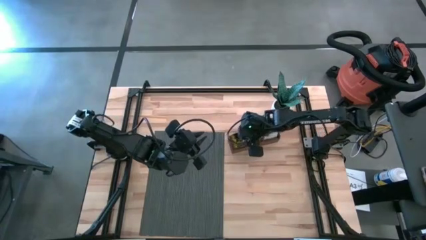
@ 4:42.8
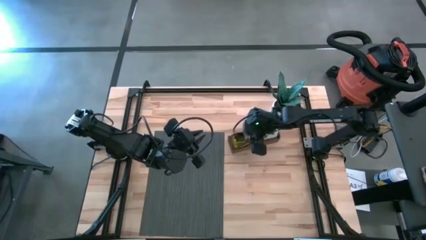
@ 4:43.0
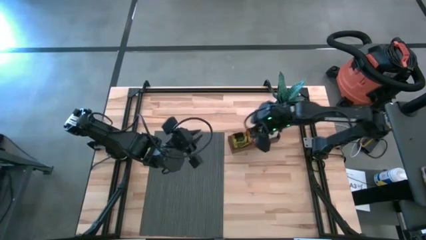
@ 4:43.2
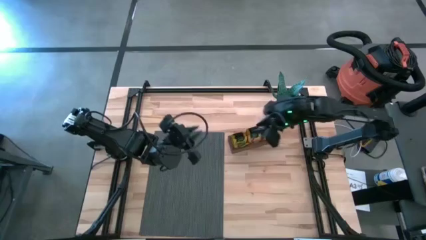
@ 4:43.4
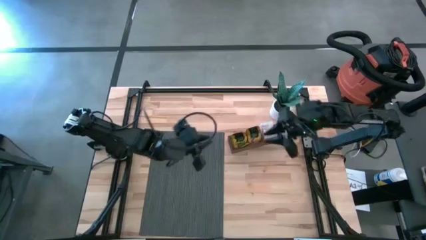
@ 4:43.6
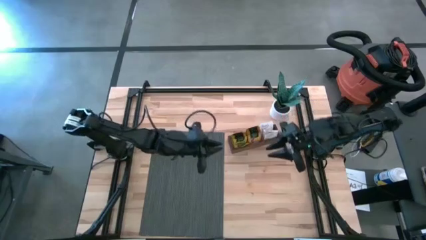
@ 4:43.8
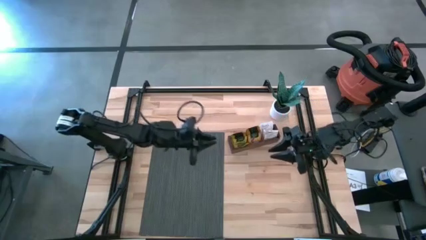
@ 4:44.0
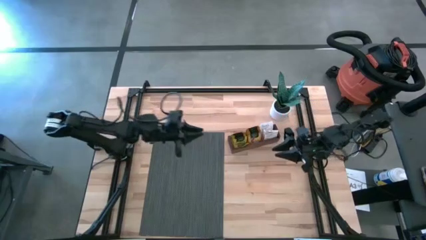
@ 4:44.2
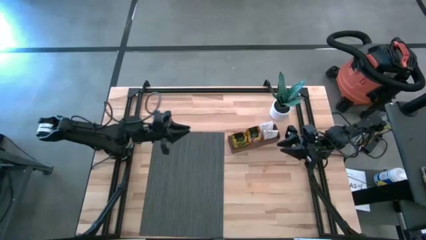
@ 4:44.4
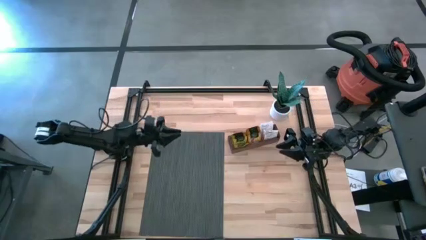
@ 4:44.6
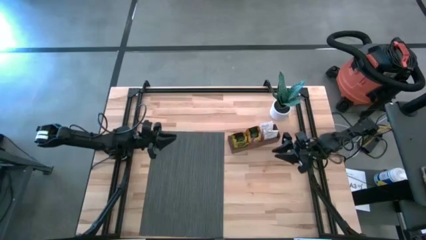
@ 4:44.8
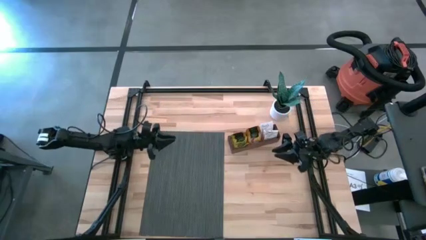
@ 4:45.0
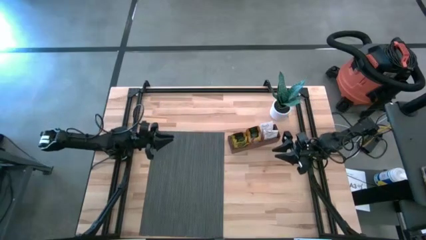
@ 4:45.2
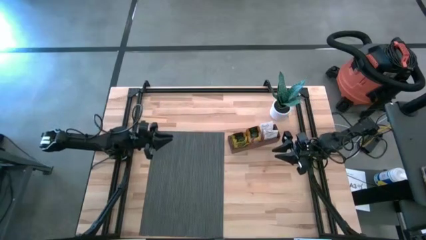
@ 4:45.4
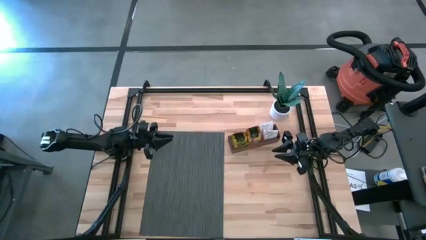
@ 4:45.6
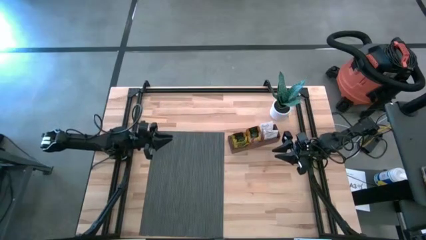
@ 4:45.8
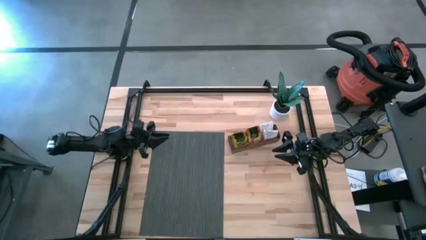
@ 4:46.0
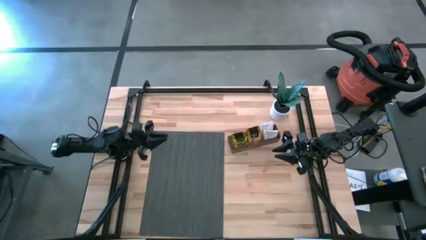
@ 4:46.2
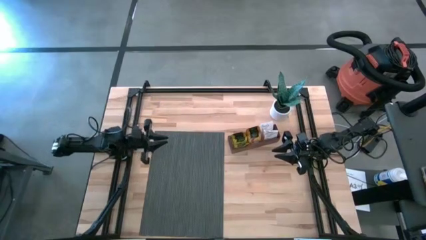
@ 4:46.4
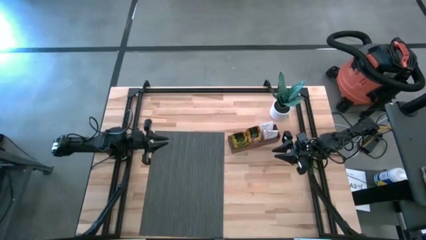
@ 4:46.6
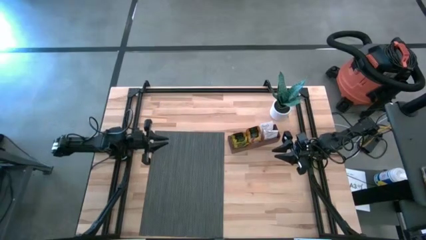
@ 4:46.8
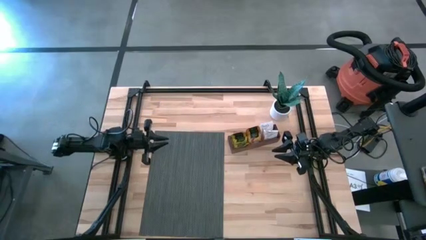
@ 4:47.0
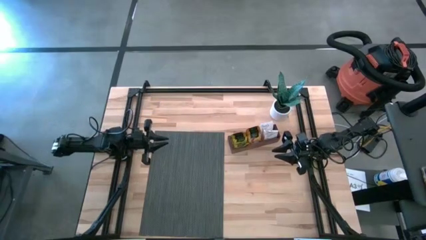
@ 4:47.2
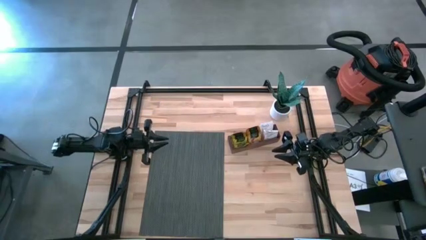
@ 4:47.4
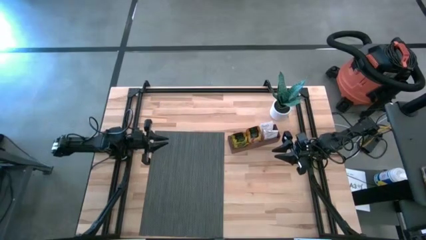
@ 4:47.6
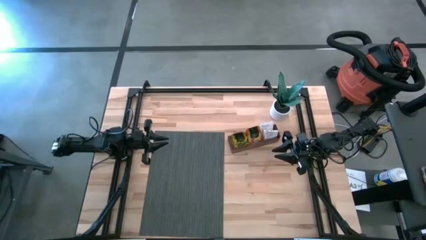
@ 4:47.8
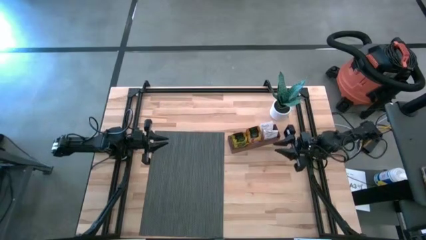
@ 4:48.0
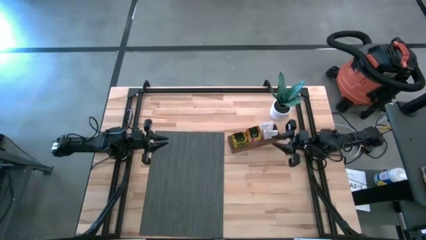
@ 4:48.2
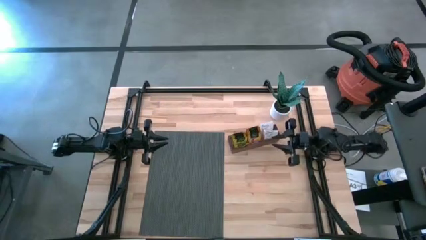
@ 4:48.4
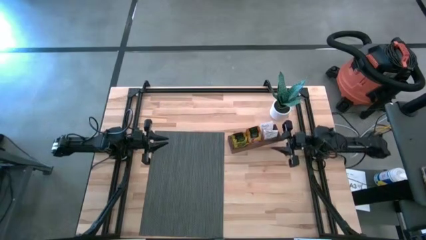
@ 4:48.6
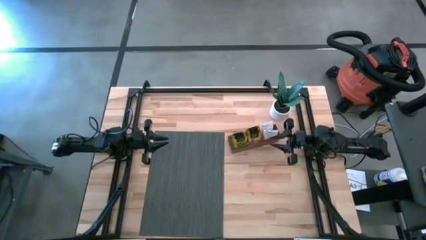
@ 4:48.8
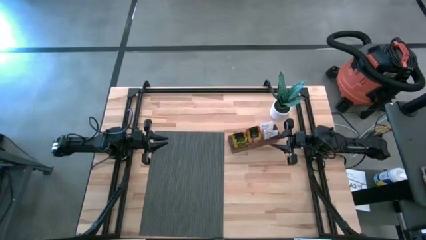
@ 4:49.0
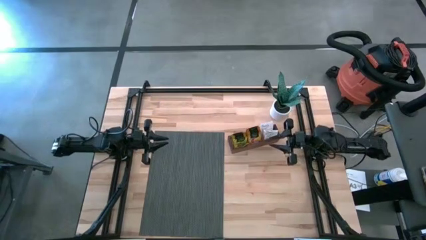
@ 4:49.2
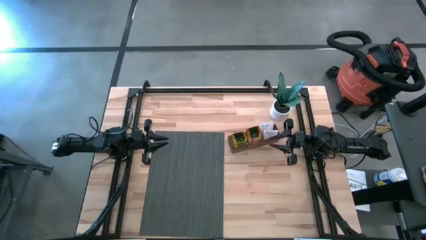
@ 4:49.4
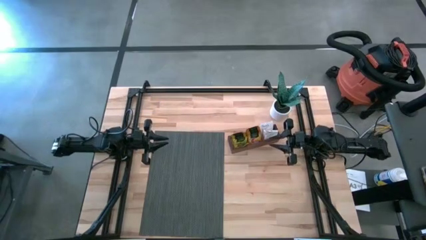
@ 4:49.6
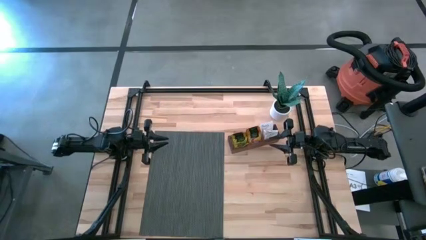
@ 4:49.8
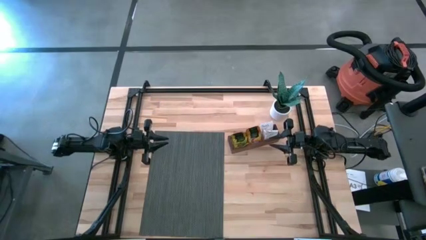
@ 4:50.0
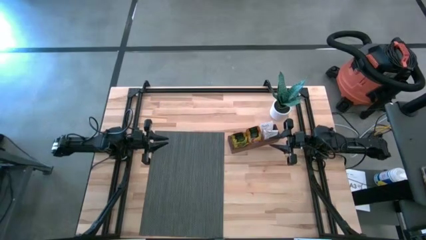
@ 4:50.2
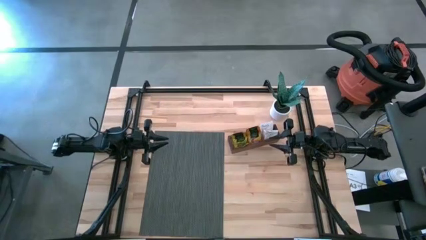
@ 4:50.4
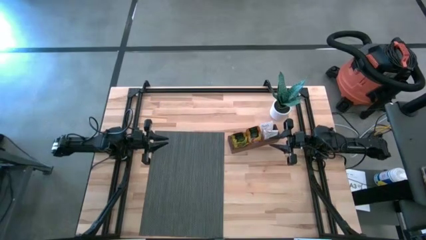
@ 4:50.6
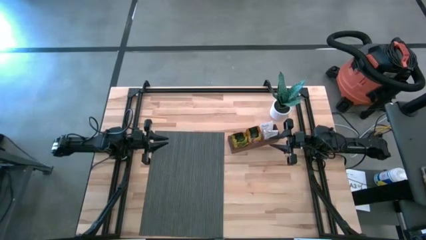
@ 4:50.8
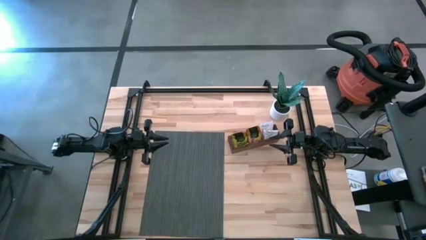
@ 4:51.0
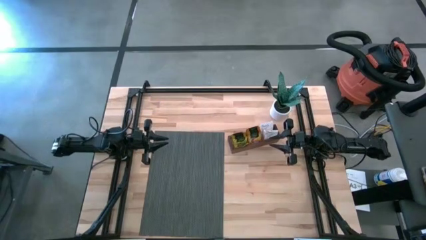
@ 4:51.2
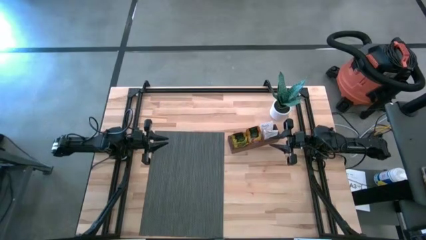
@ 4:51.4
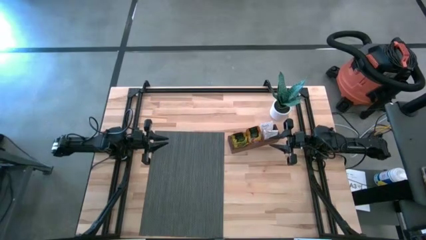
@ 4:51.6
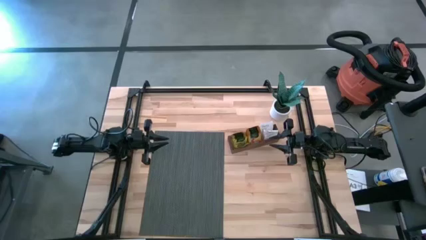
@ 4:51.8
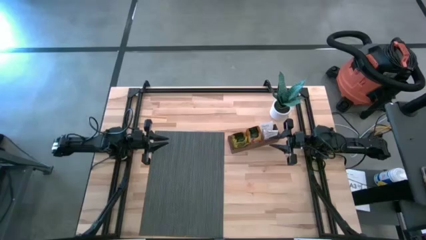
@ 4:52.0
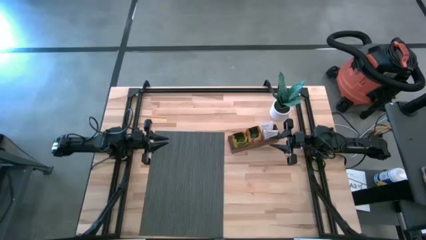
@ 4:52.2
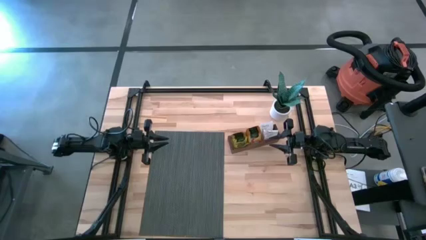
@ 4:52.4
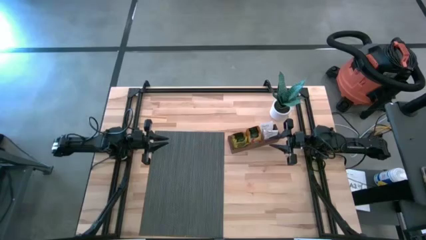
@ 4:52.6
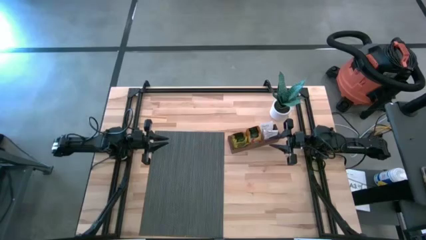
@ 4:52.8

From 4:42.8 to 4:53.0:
Task: Pick & Place Tea
Return to Home Position

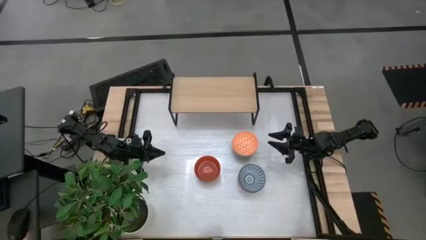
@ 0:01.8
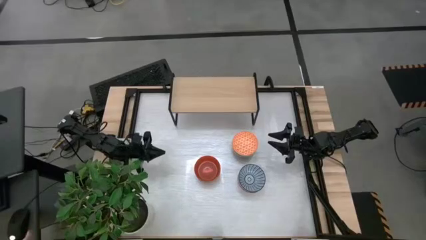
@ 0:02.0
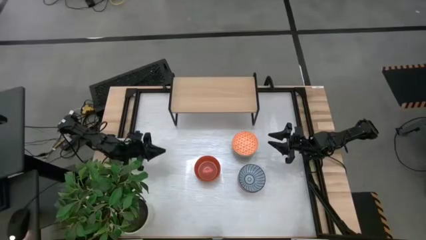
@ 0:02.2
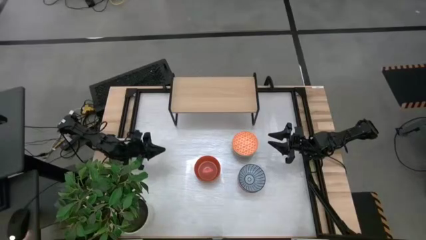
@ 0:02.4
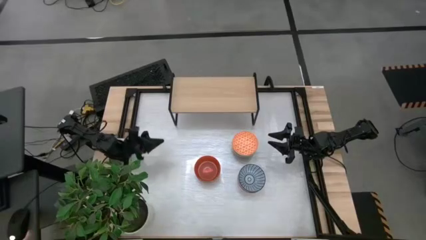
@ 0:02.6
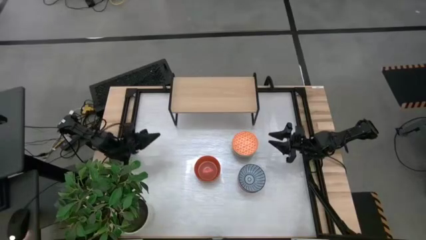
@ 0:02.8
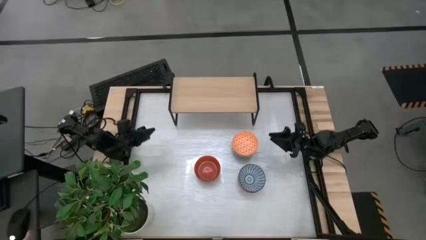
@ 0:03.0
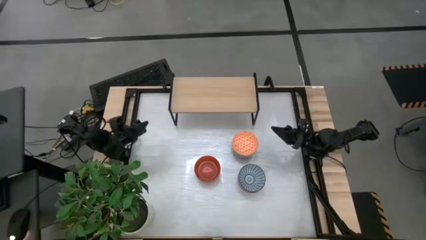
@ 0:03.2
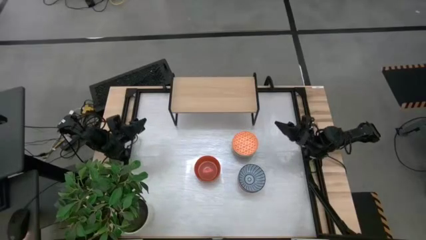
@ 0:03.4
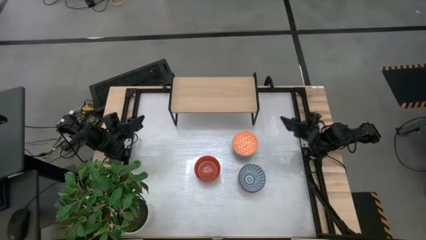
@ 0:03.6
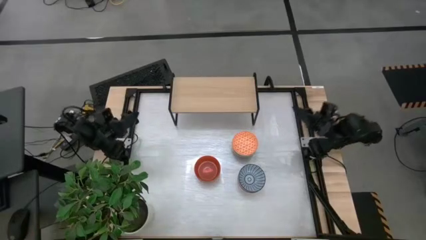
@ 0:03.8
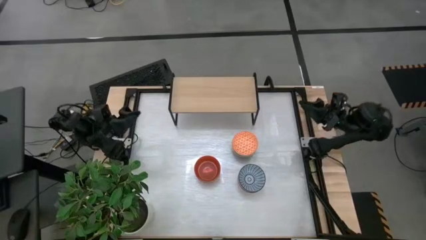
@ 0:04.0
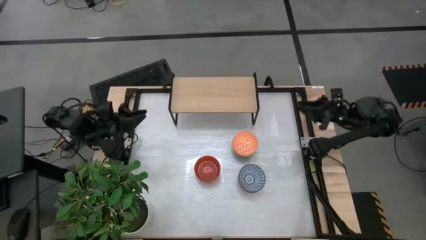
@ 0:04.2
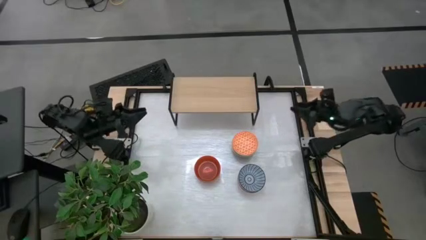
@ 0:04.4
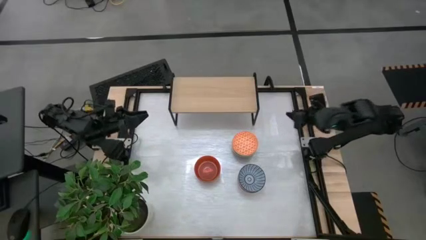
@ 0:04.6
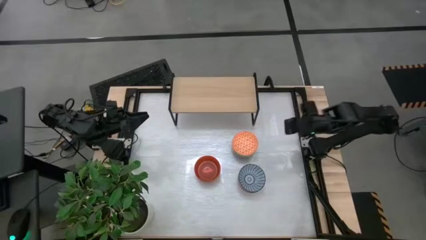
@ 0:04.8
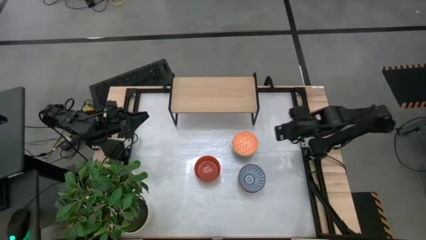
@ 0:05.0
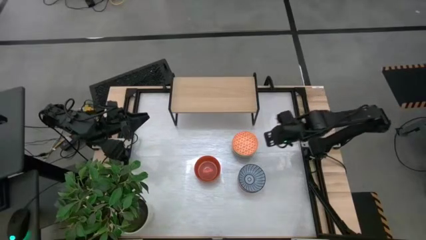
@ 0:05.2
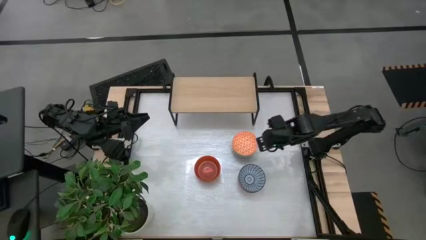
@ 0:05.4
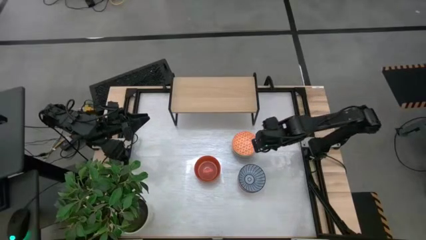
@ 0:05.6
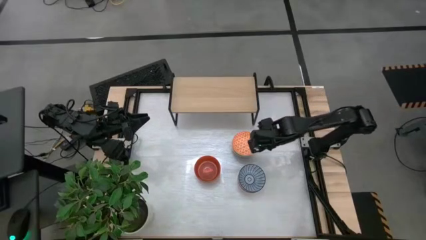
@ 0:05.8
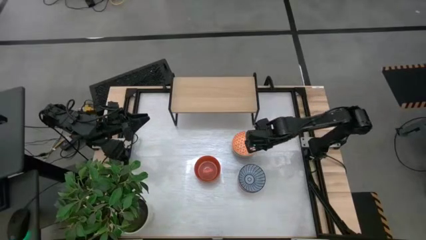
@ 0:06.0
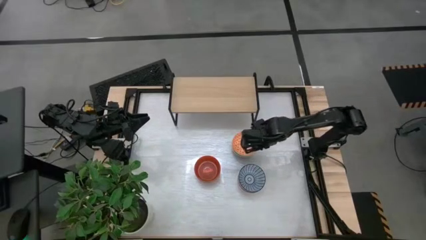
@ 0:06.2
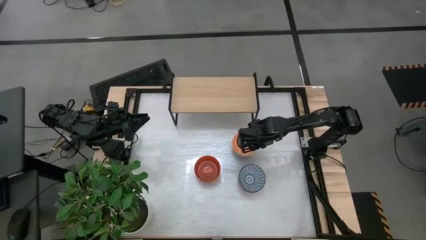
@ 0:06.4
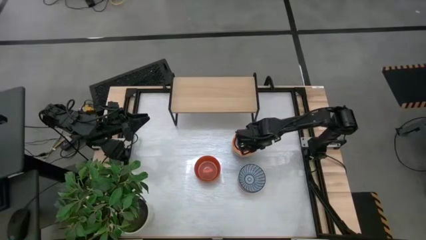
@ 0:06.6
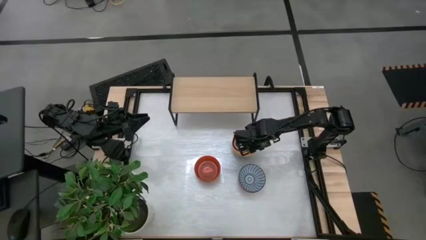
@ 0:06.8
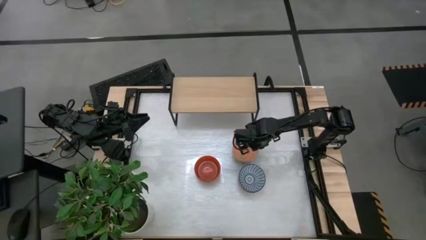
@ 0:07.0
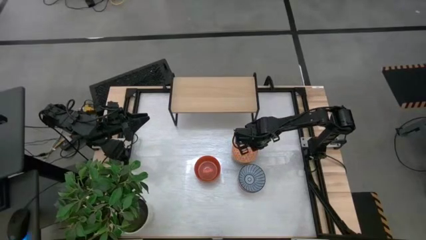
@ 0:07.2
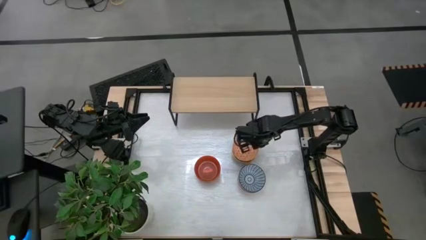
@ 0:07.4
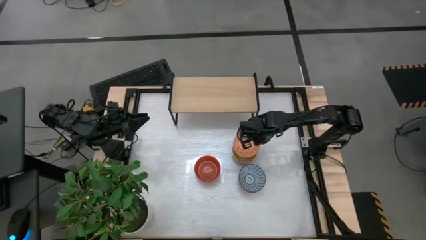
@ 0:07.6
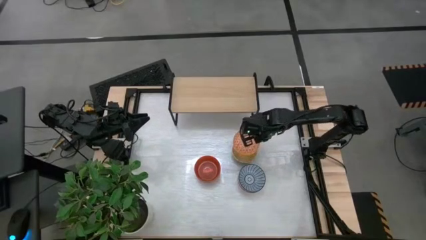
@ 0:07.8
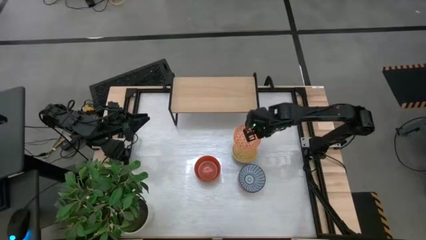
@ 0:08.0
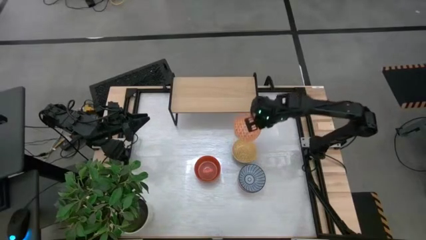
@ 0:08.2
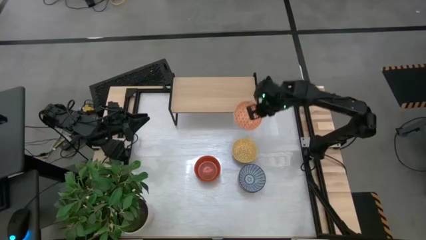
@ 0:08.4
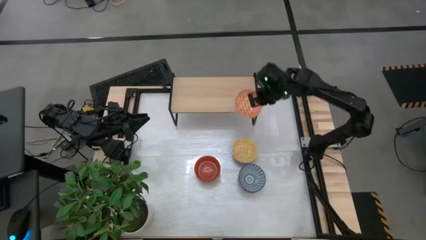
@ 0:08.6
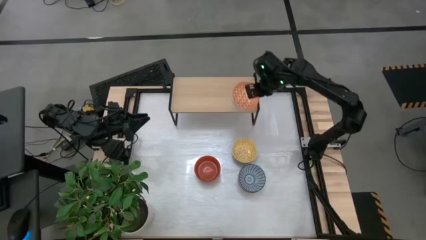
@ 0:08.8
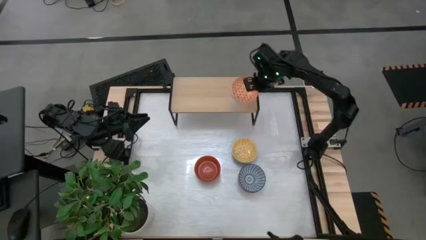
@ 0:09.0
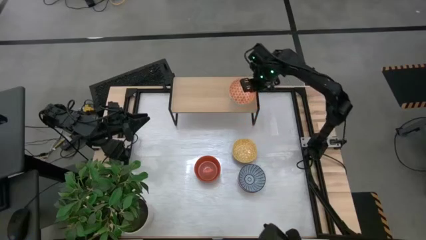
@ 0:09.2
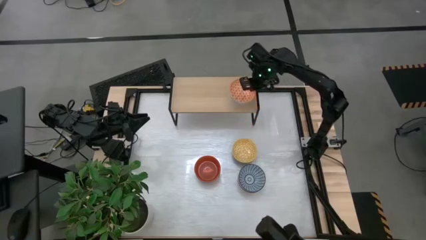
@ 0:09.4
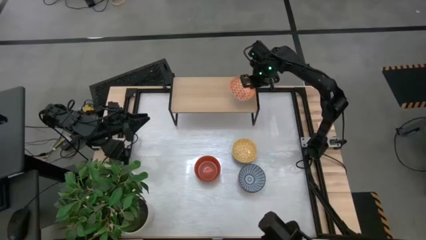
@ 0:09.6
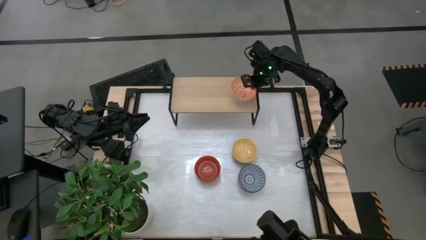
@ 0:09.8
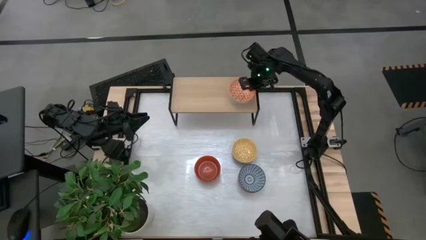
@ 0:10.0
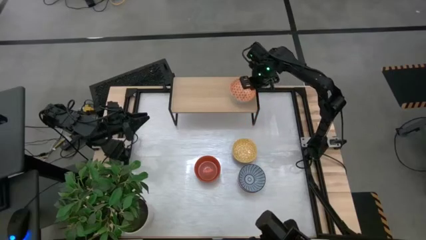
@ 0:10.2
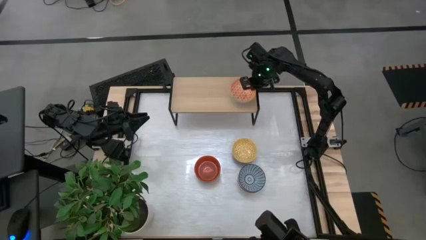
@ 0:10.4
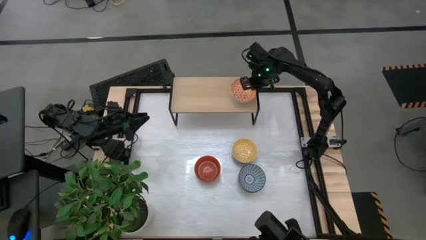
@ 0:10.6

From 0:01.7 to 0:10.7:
Task: Place and stack bowls onto a shelf
Put the light orange patterned bowl on the shelf
